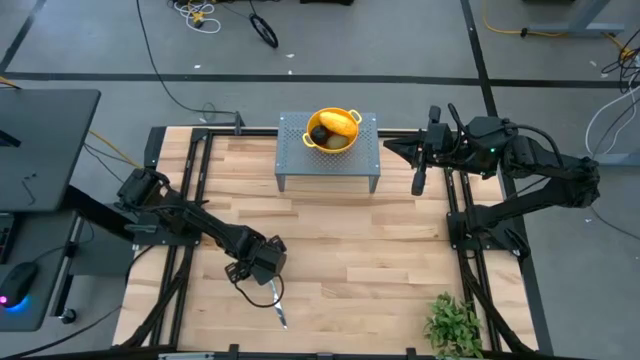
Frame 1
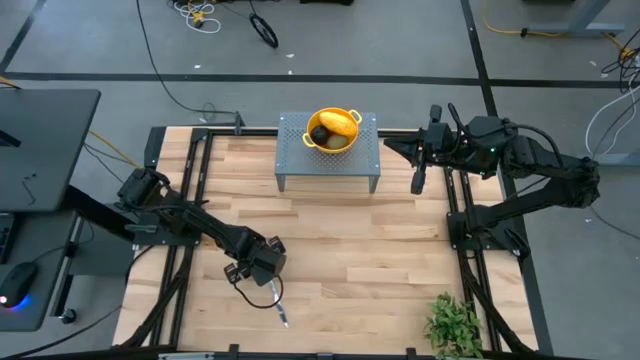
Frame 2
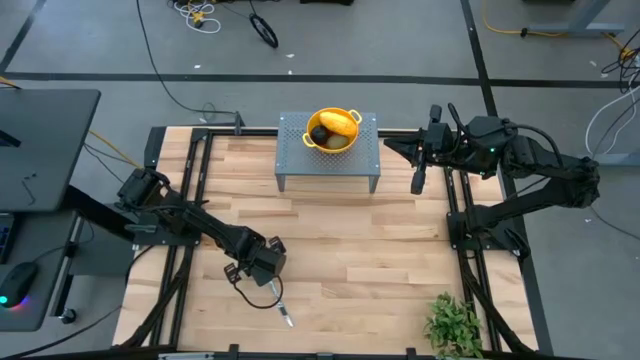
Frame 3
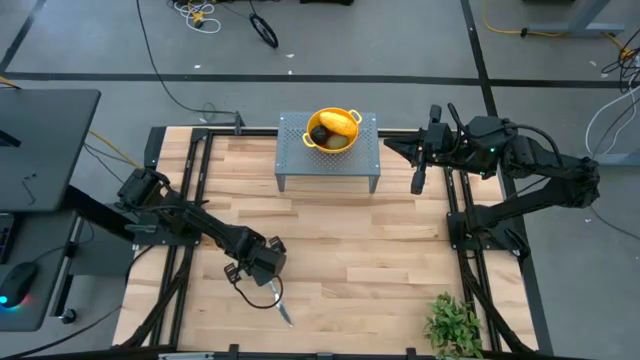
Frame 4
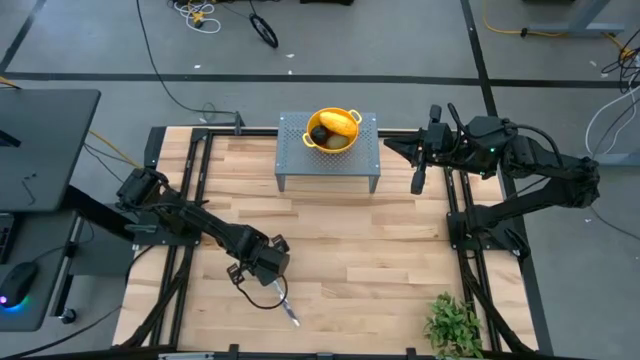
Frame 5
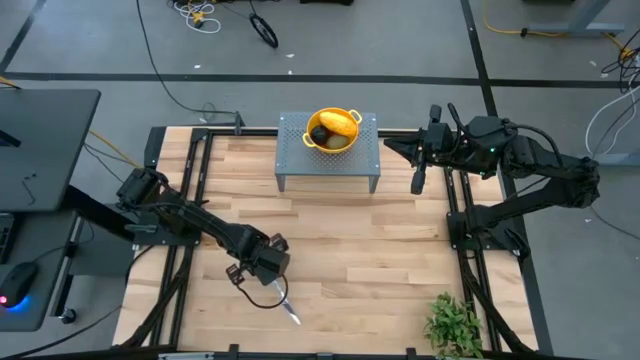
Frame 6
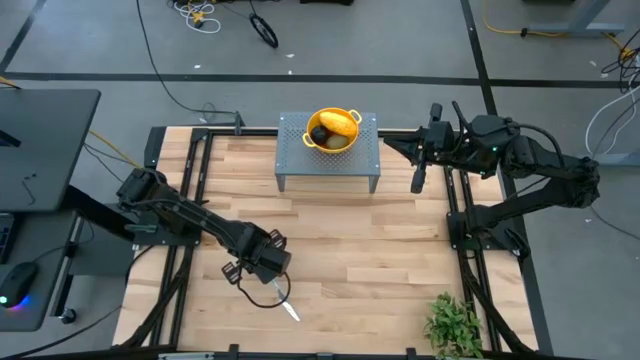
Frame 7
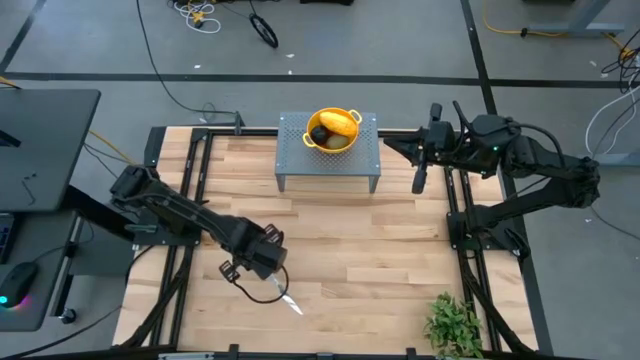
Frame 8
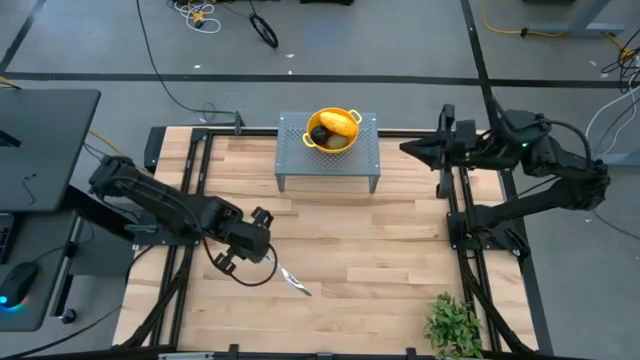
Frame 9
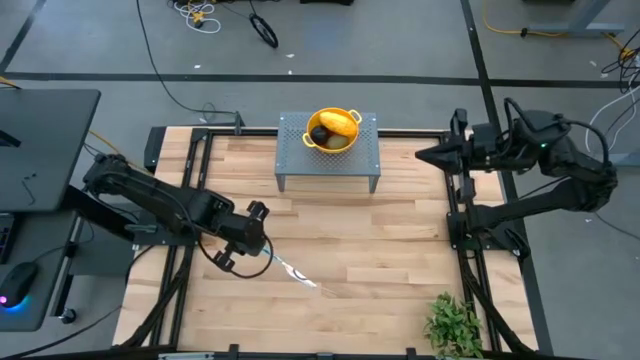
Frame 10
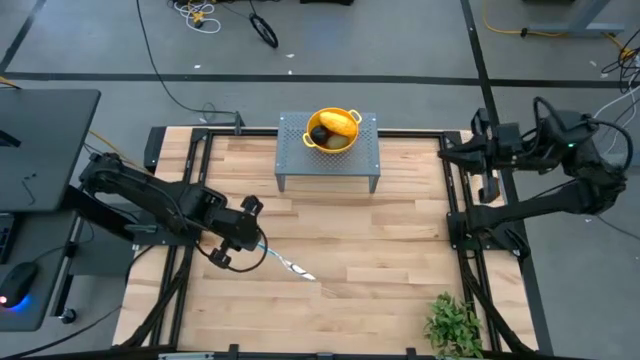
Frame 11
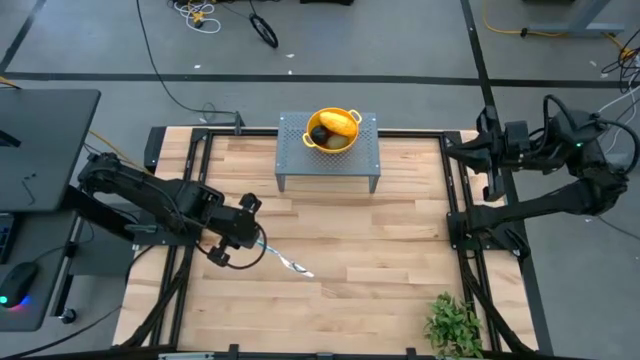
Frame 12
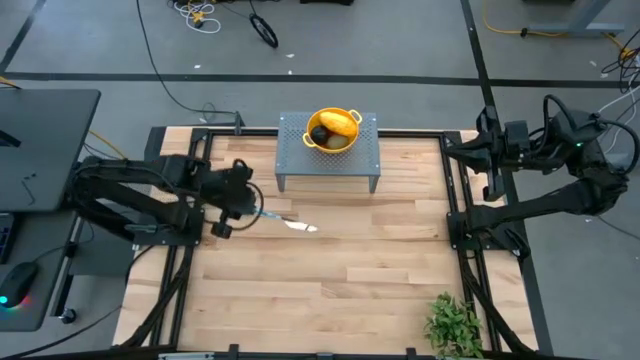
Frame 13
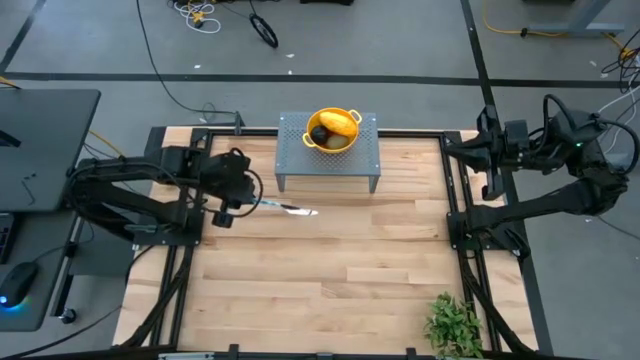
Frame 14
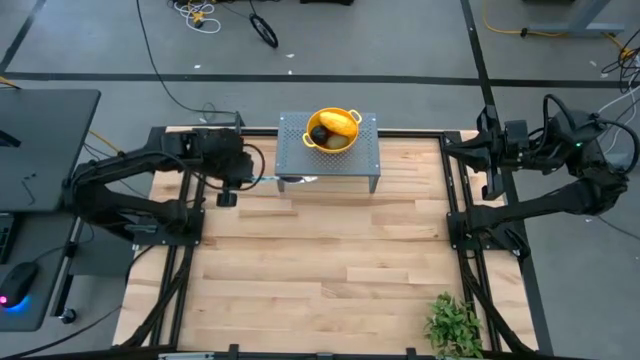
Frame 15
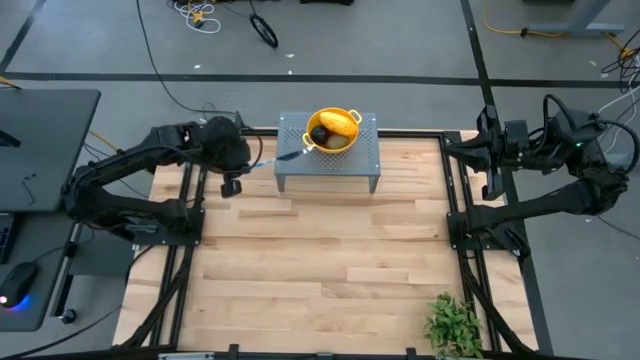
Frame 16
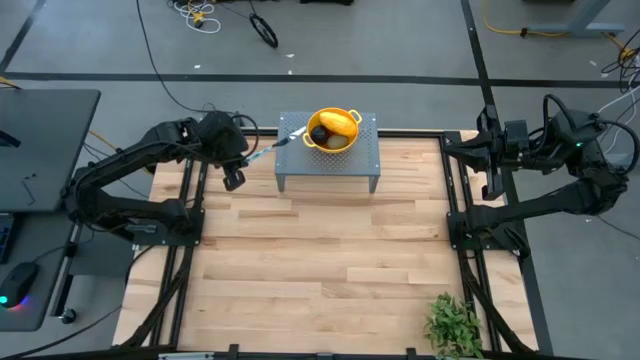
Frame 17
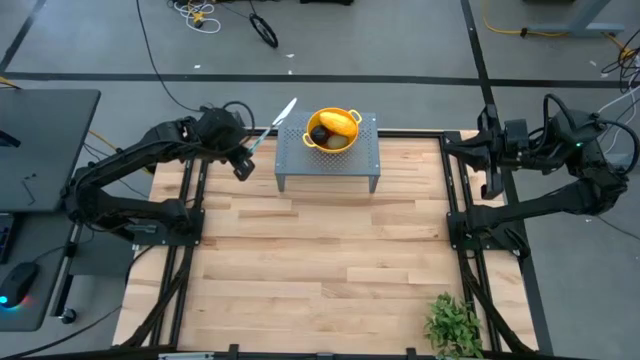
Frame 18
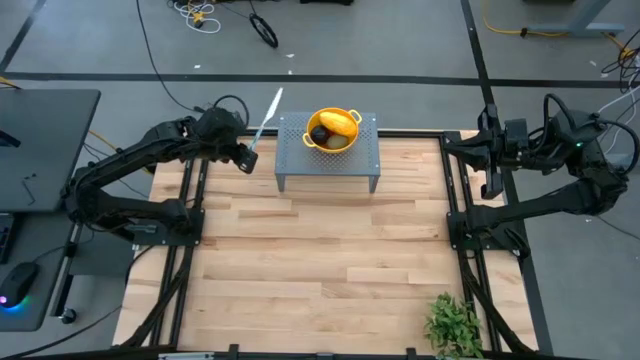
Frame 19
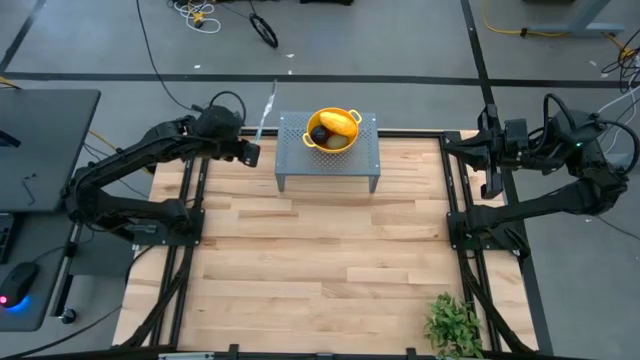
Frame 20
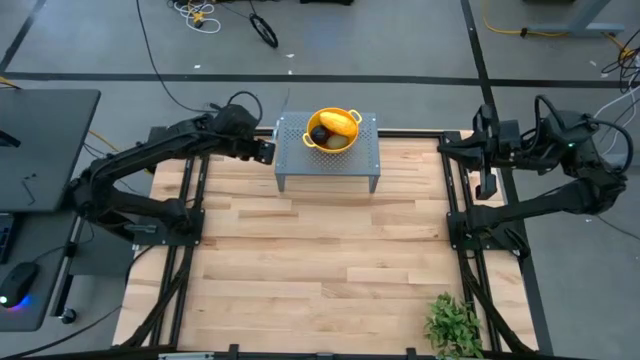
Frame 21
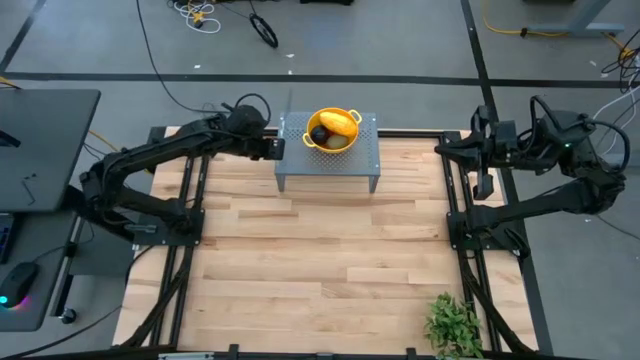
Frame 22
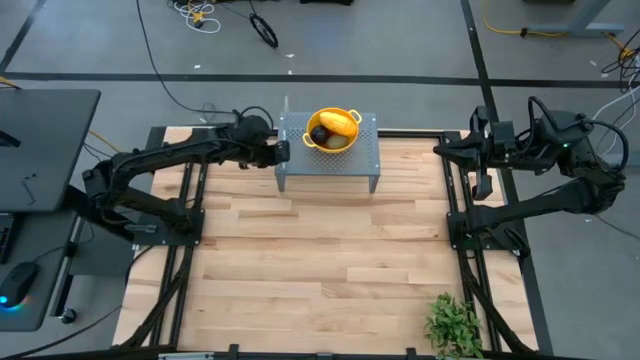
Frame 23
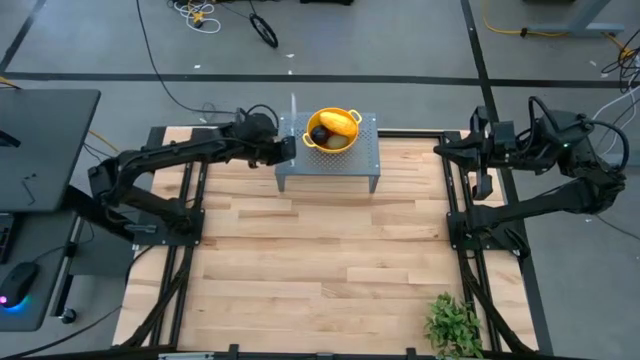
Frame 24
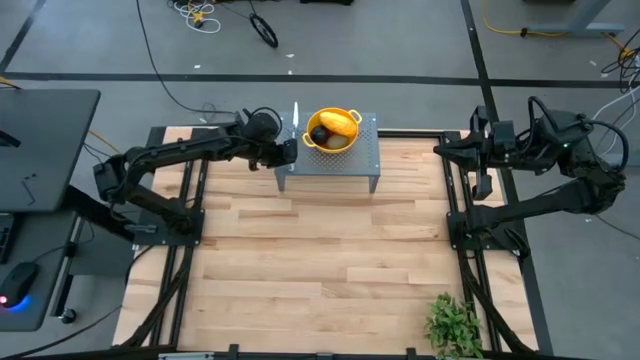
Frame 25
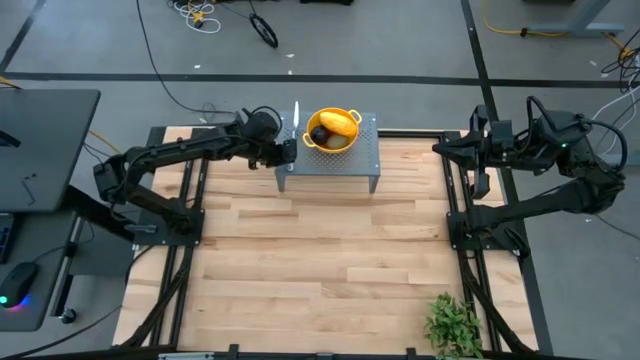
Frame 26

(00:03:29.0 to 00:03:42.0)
Task: Pick & Place Fruit
Put the green table knife to the left of the colander bowl on the shelf

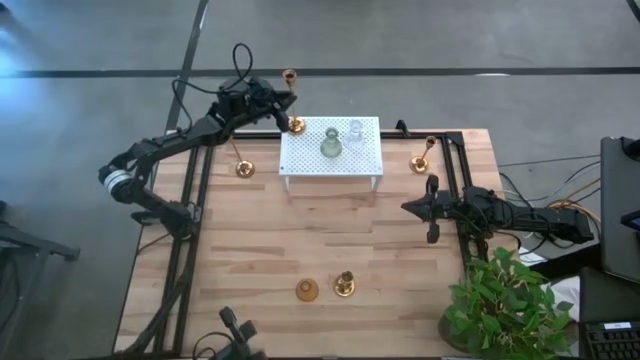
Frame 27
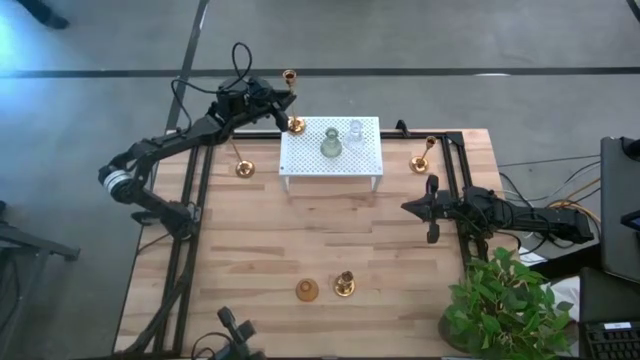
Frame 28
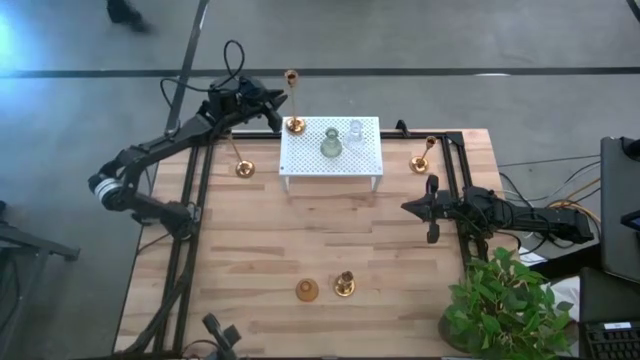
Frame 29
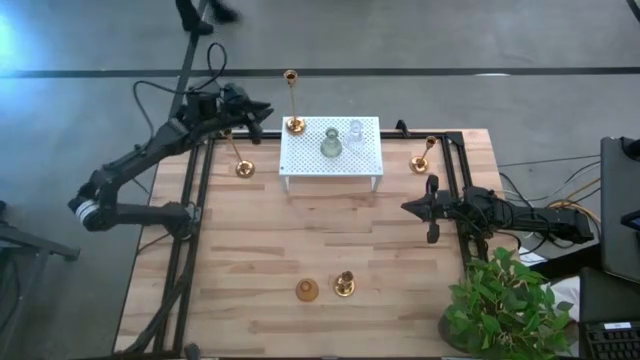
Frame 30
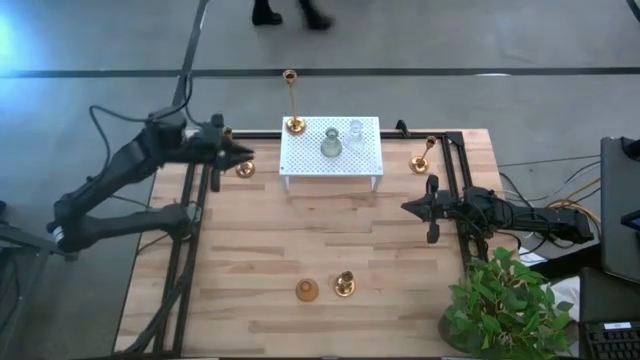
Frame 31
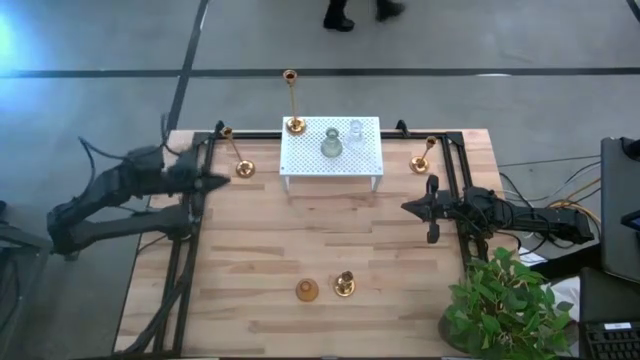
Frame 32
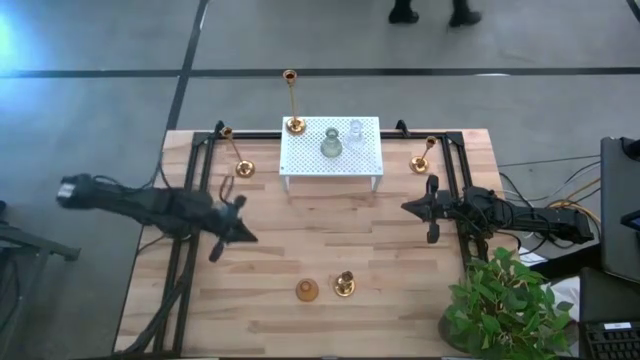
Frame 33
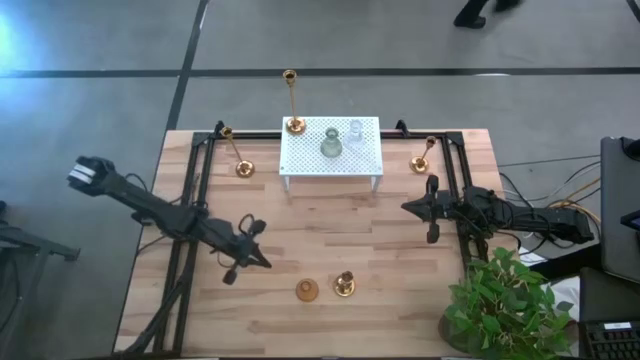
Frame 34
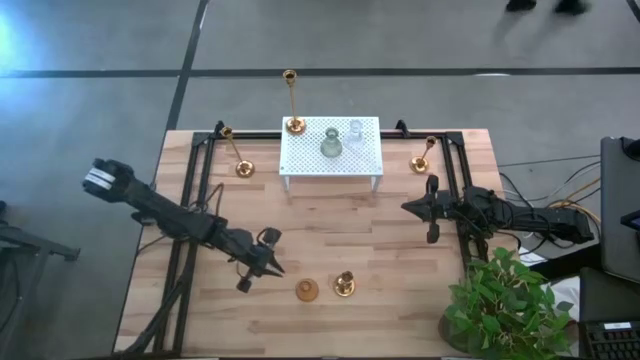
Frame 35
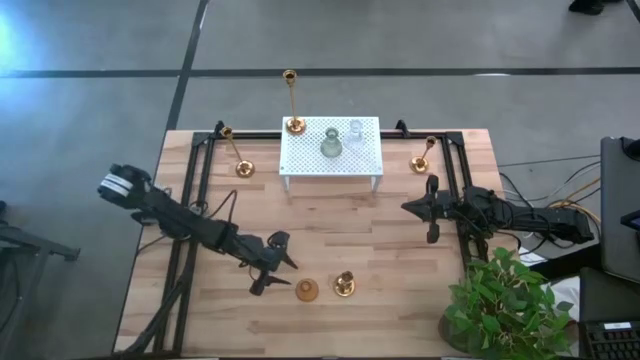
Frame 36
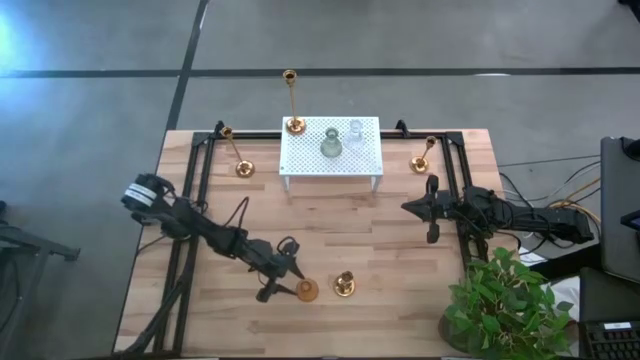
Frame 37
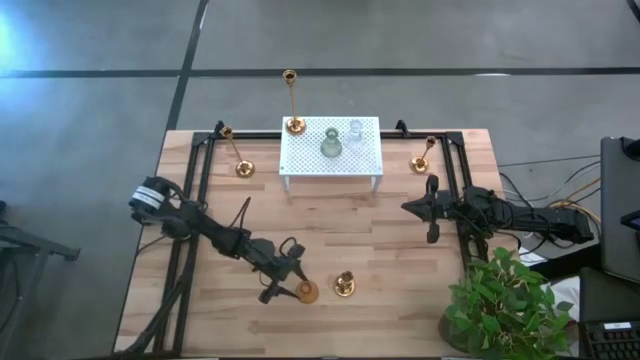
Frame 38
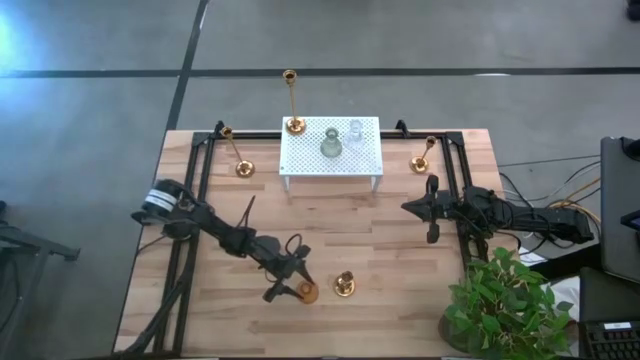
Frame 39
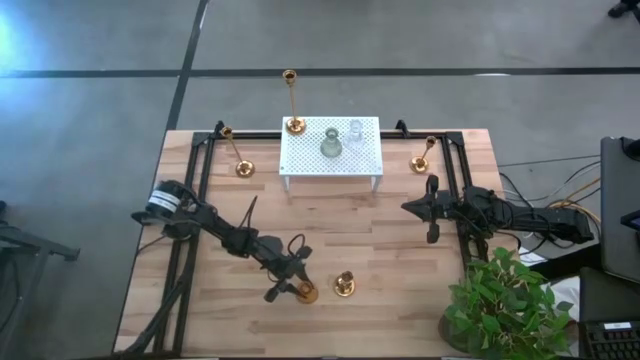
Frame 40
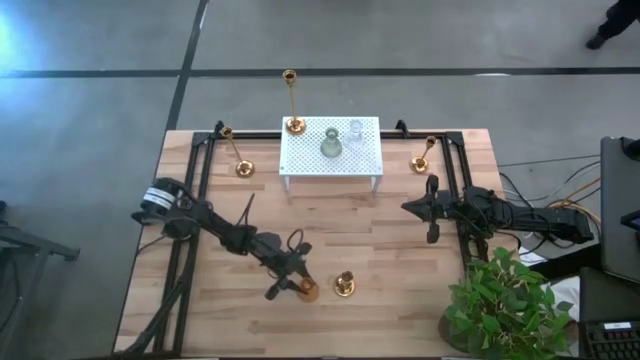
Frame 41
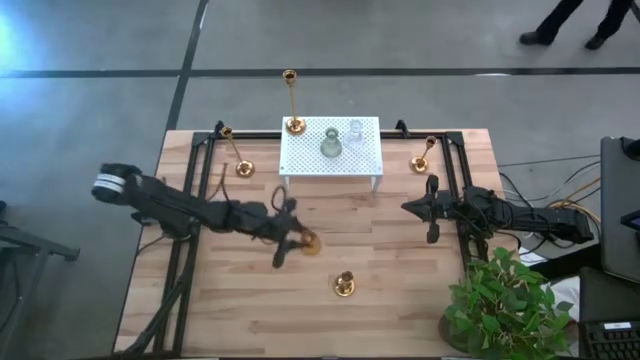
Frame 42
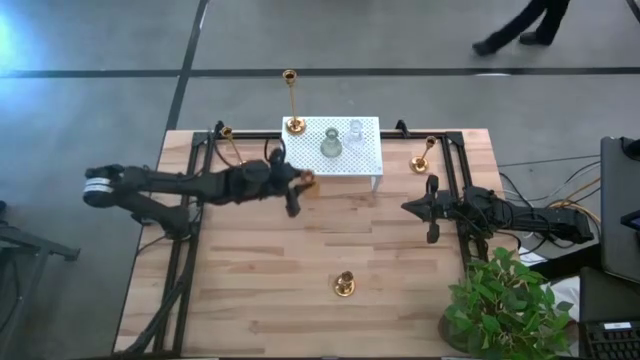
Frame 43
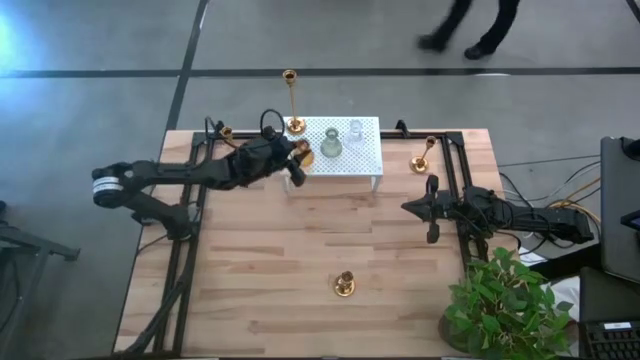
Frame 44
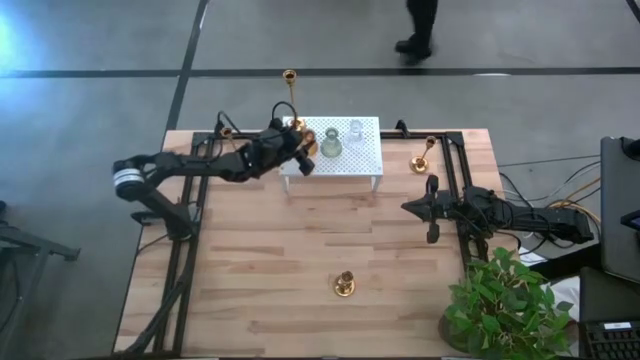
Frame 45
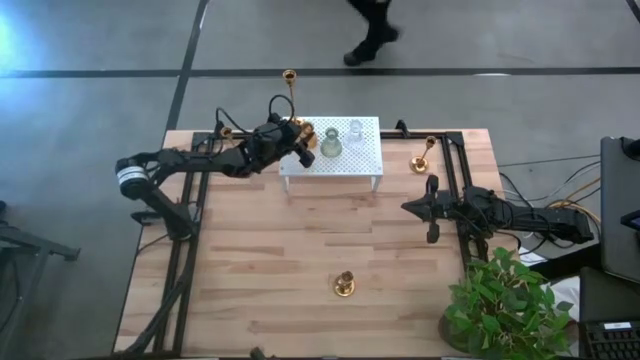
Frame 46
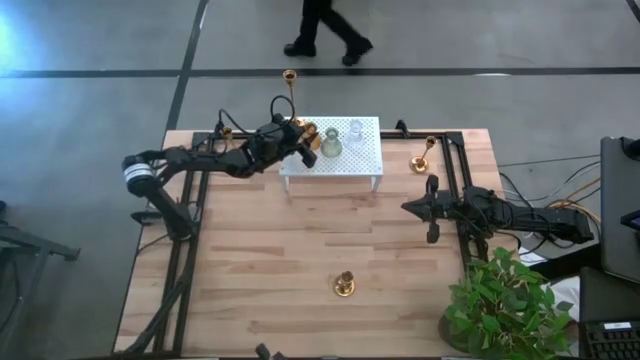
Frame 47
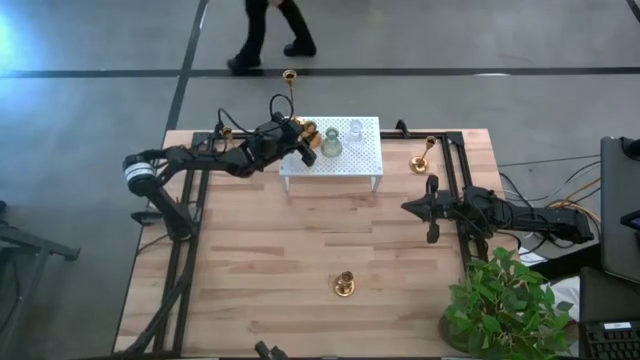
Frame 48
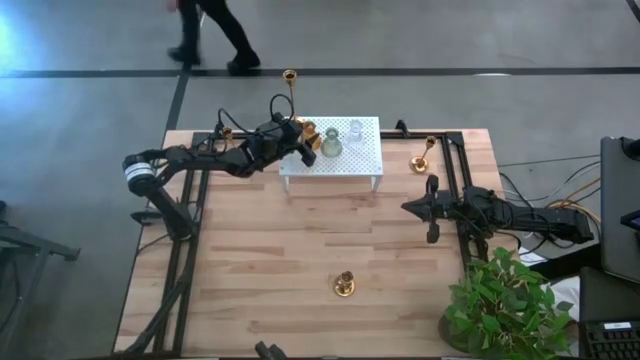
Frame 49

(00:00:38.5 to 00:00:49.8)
Task: Pick & Place candle stick holders
Put the yellow glass candle holder on the shelf
